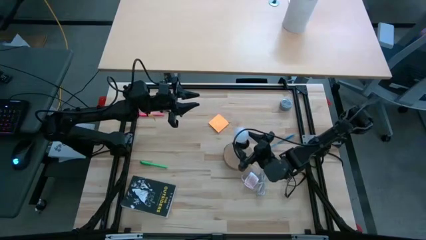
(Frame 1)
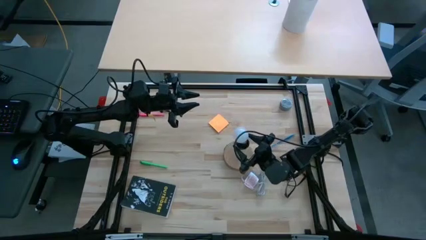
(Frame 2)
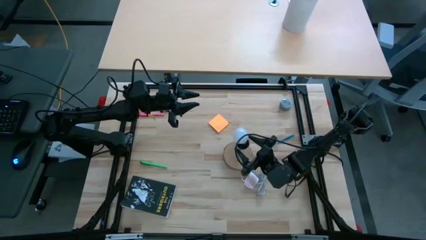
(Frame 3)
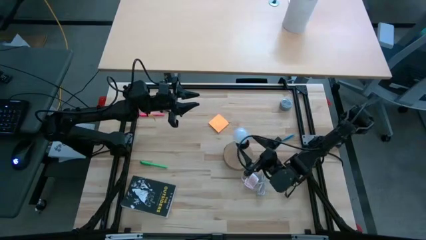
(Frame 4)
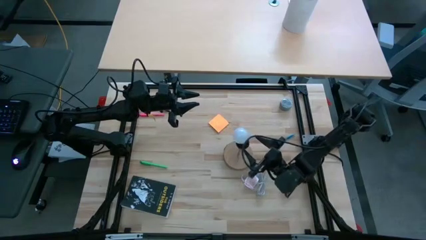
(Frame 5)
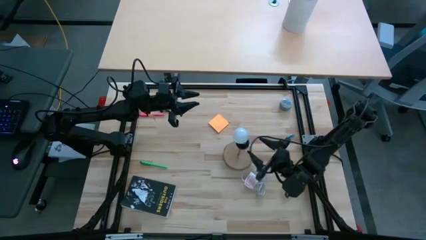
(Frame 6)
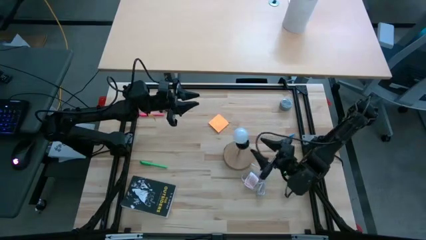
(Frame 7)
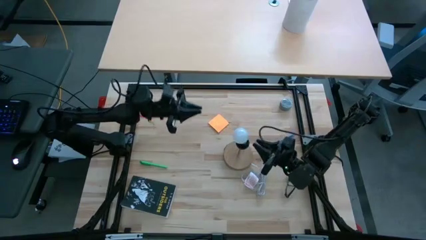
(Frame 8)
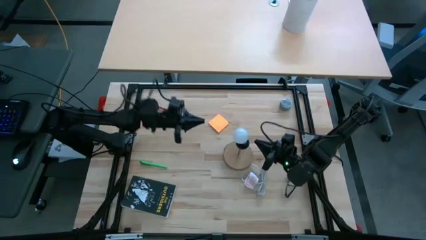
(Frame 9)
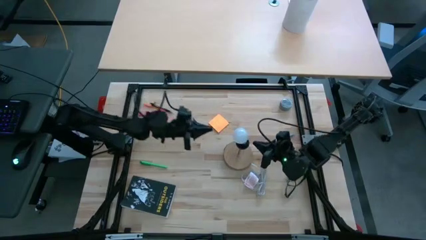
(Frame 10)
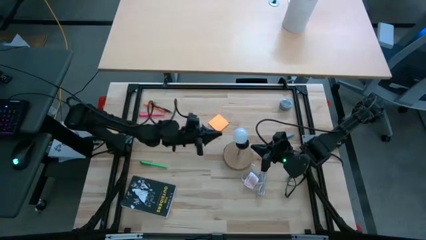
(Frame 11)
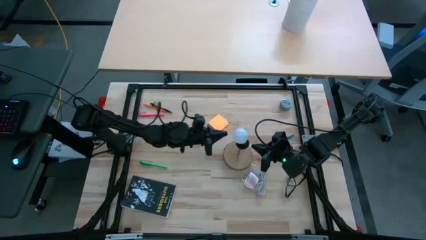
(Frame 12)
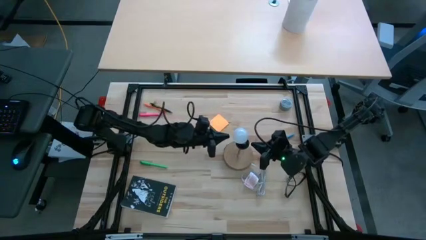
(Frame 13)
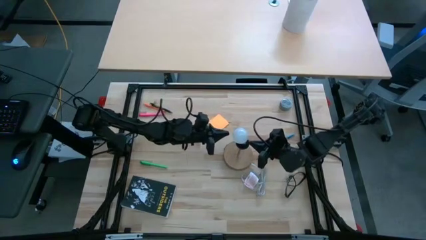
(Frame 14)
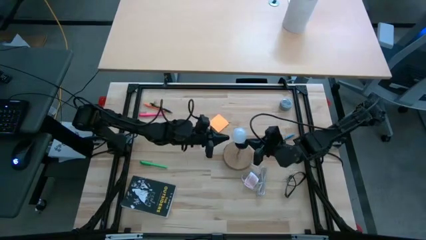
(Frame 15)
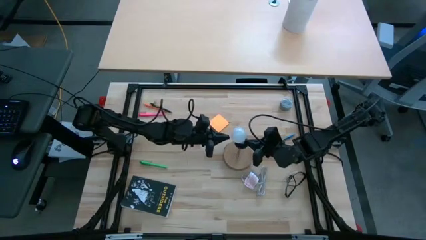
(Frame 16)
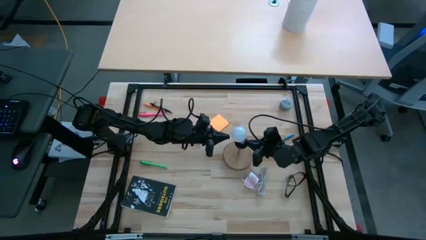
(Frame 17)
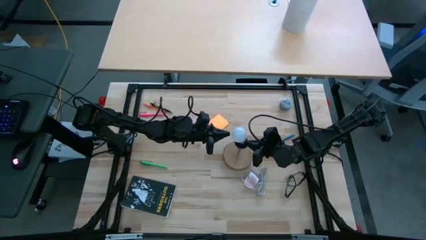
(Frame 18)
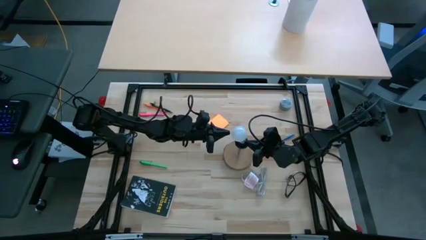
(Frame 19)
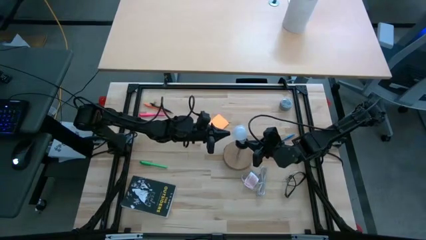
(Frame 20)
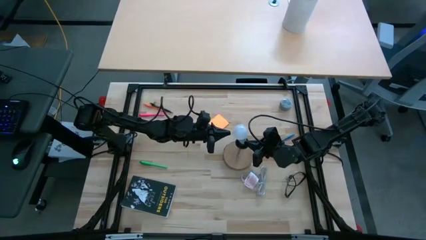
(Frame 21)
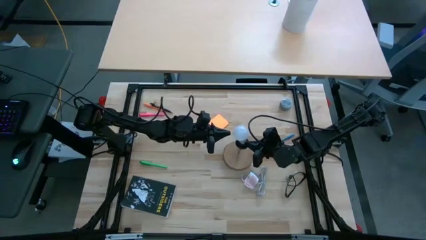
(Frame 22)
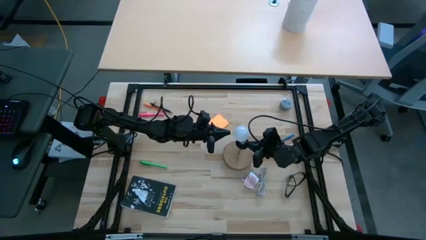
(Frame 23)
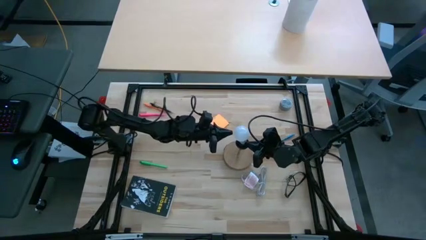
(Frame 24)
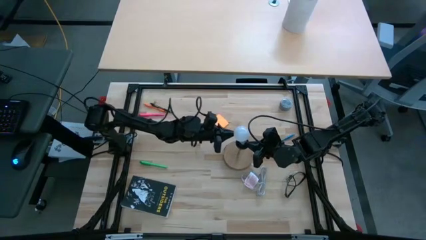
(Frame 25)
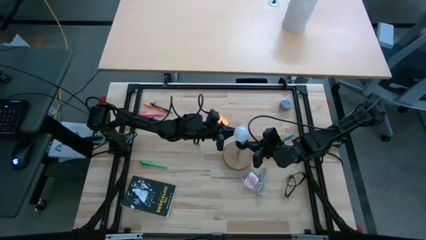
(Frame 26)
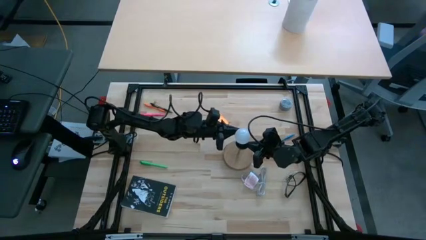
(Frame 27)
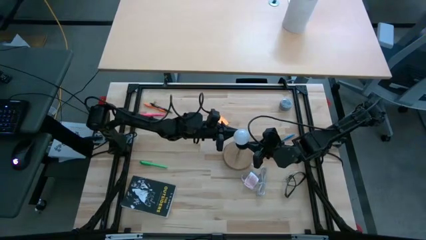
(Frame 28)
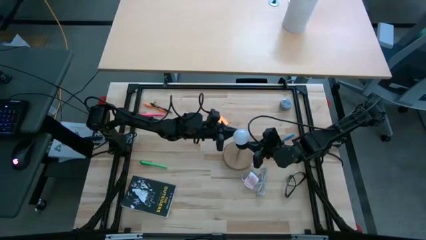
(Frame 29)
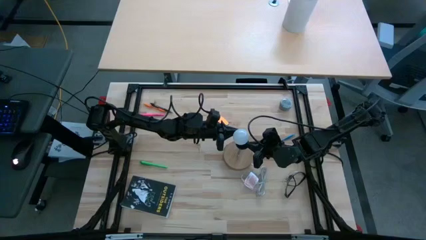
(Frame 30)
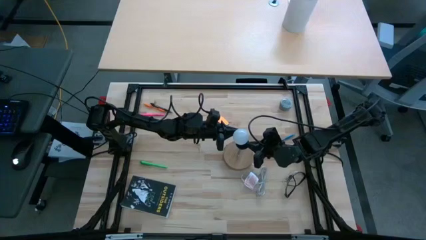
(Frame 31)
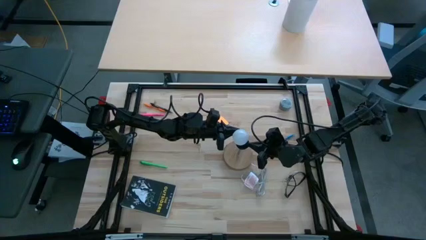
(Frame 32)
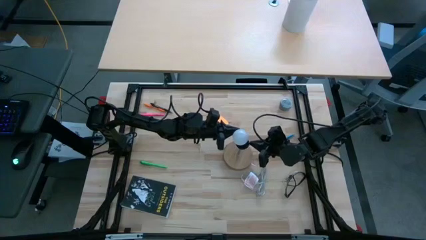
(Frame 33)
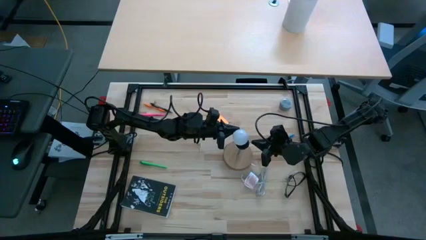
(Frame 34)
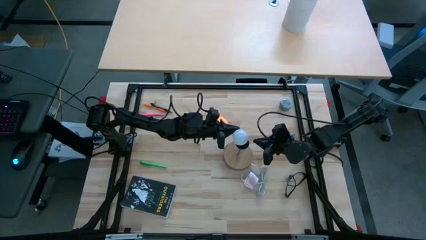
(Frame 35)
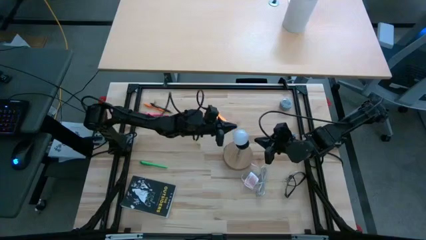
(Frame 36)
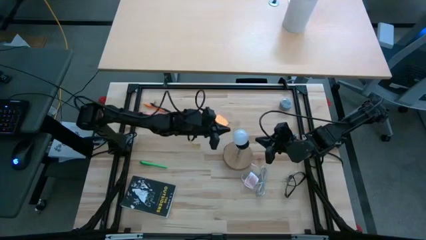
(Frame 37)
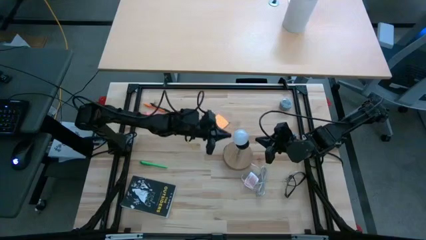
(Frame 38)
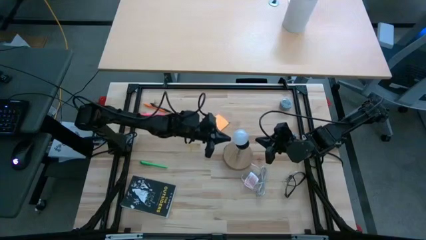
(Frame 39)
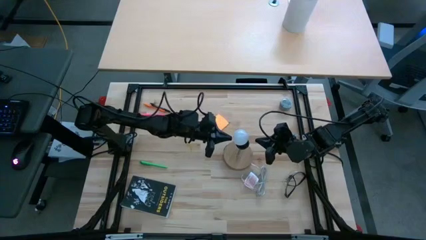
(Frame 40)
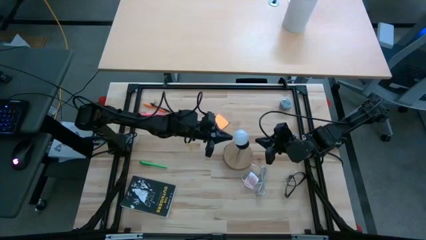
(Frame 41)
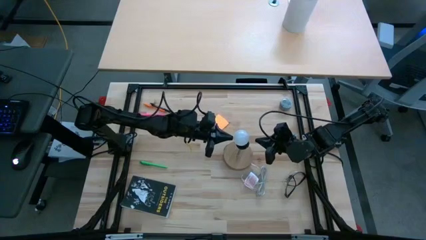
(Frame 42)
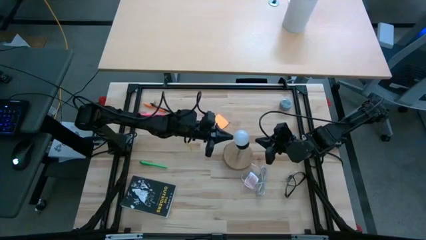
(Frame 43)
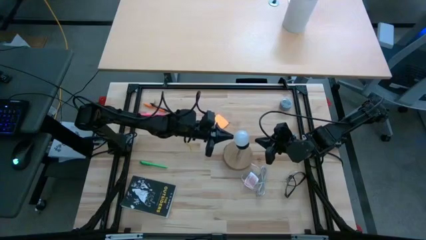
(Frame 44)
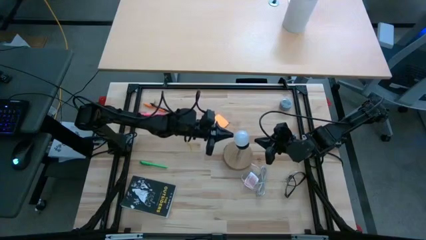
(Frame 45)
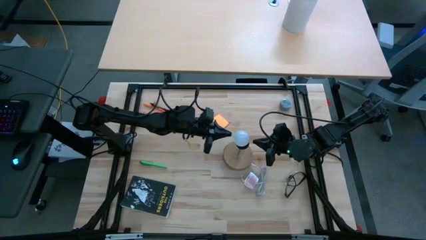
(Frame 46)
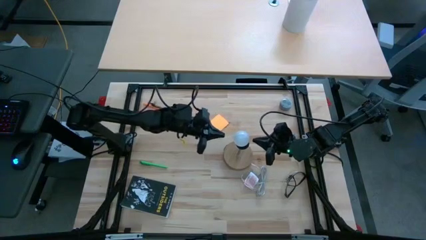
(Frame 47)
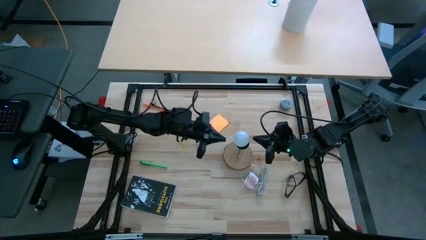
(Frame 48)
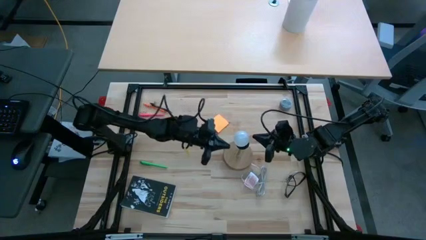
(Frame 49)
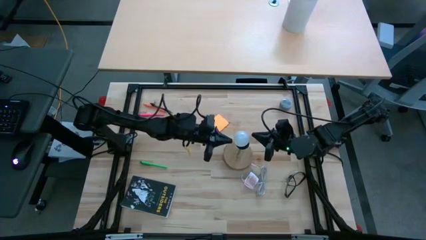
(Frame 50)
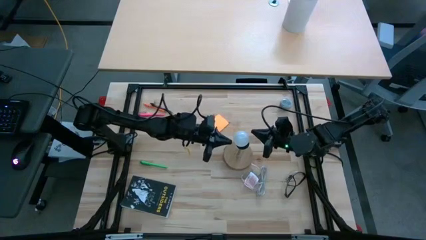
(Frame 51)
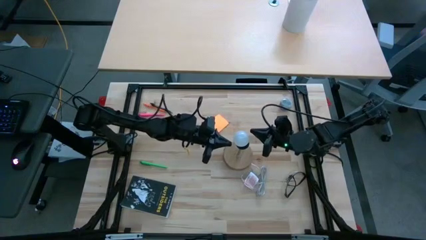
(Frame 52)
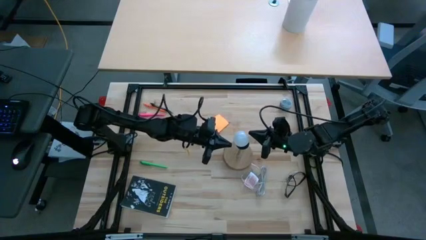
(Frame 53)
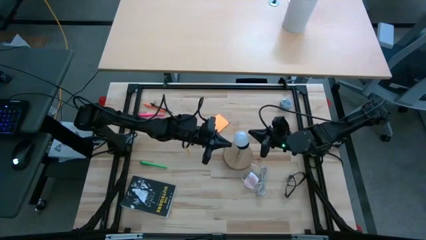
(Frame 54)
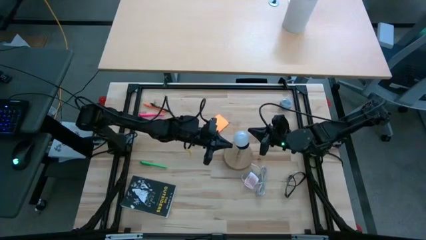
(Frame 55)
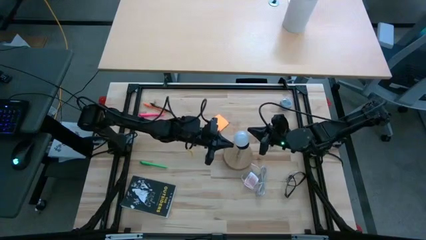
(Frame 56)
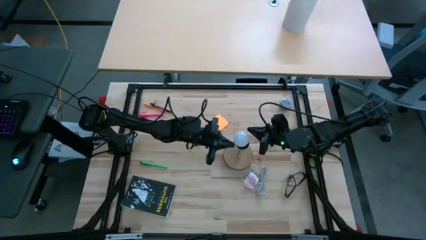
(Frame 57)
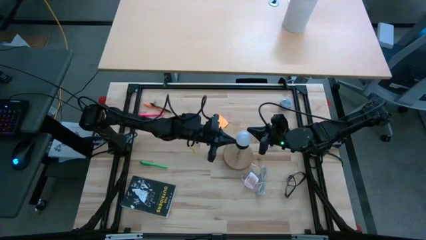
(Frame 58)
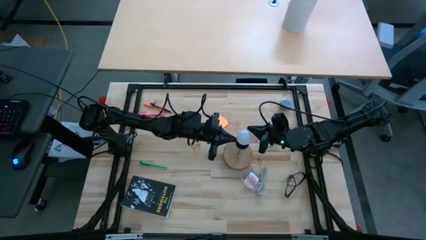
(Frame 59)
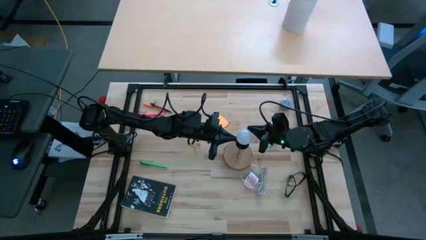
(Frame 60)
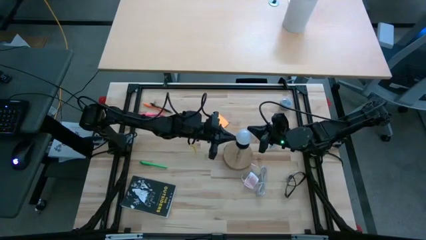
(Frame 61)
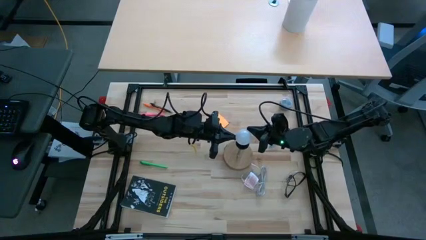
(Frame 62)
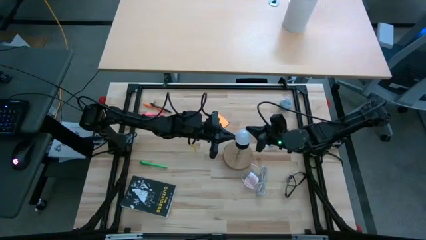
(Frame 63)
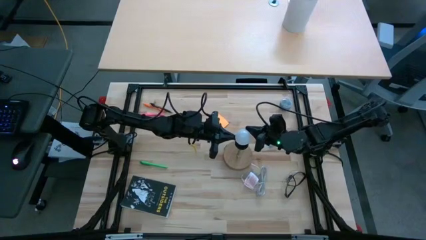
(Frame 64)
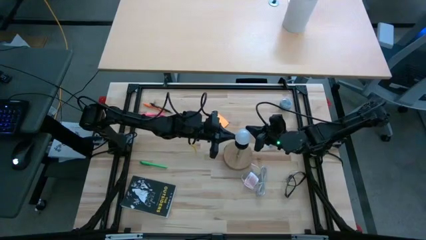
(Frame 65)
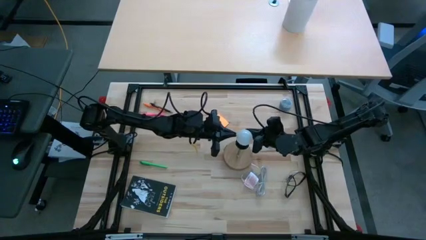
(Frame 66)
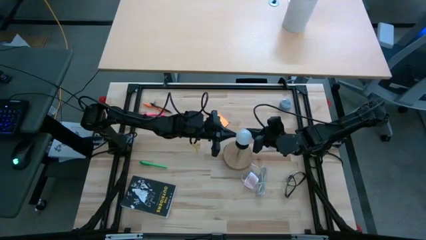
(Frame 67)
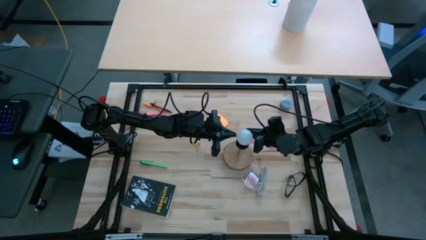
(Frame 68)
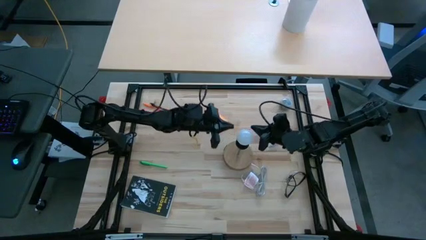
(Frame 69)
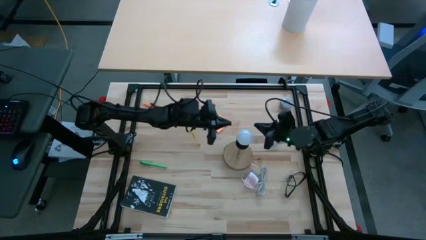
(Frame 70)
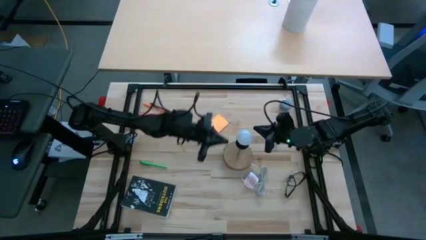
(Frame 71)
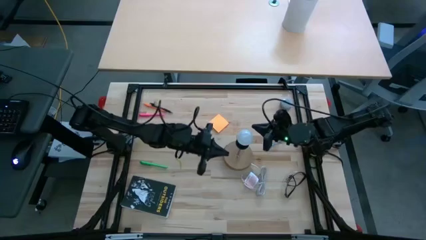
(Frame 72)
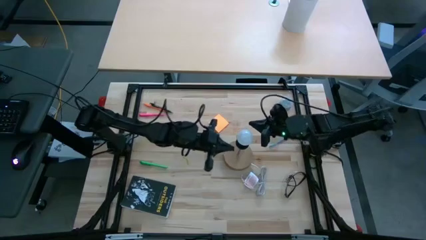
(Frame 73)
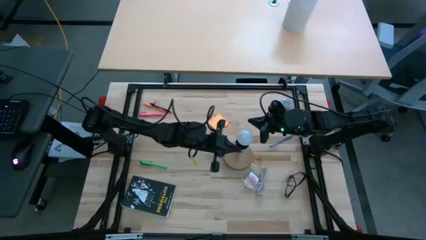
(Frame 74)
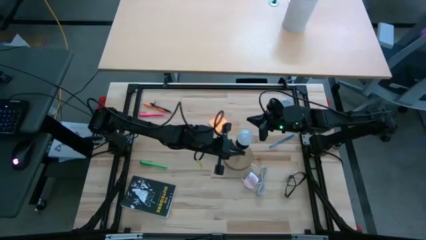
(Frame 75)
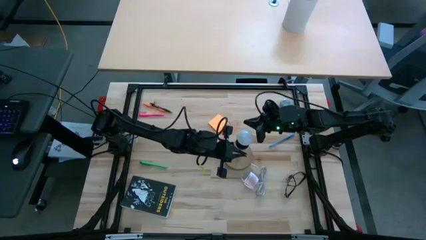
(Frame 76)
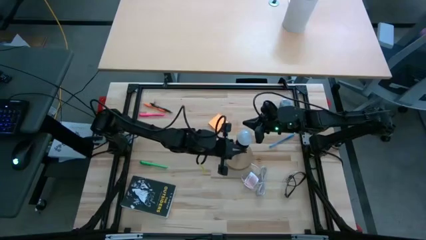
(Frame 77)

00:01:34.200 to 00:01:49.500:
Task: Screw lightbulb
Insert the white lightbulb into the lamp
